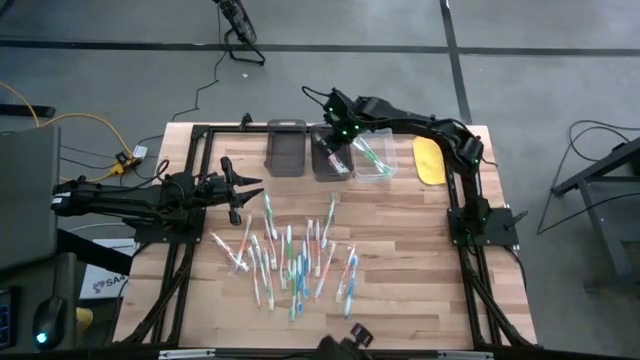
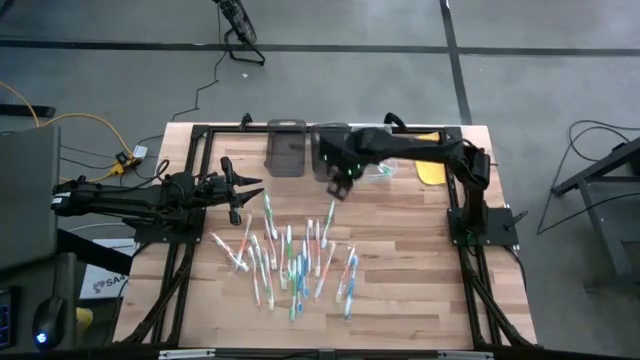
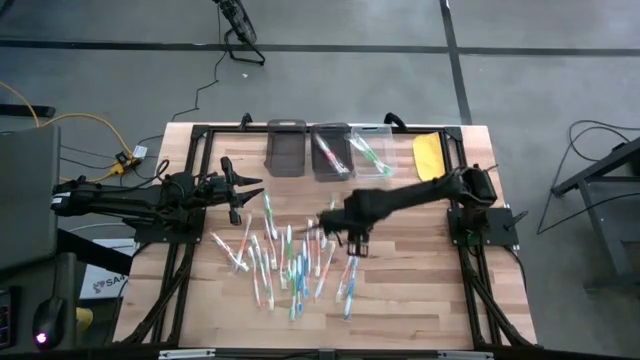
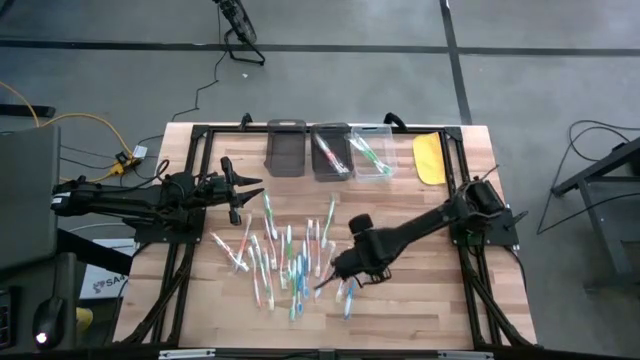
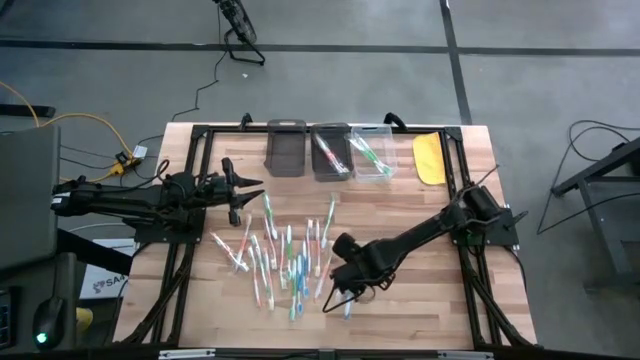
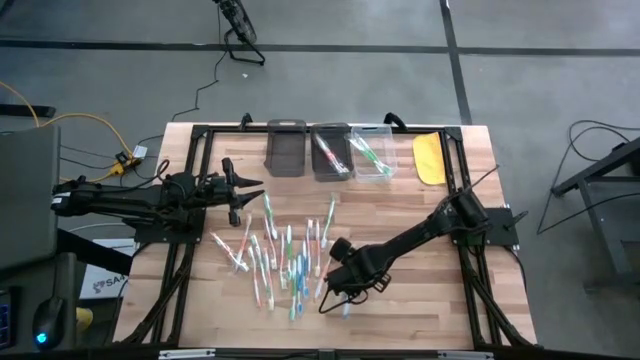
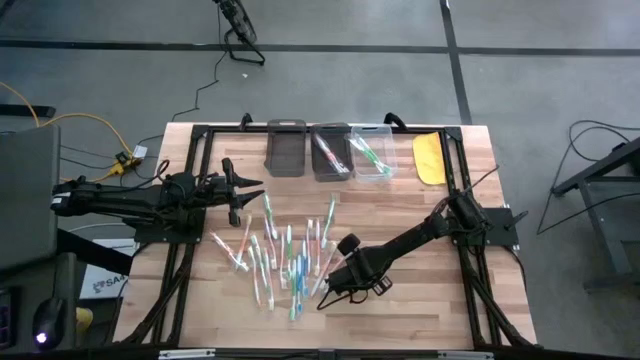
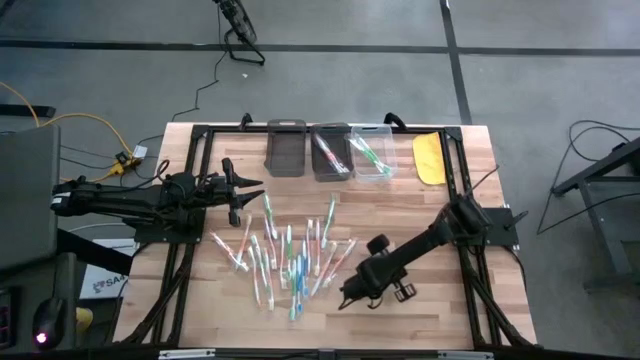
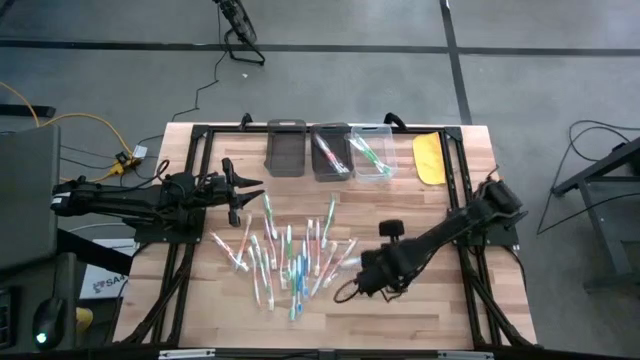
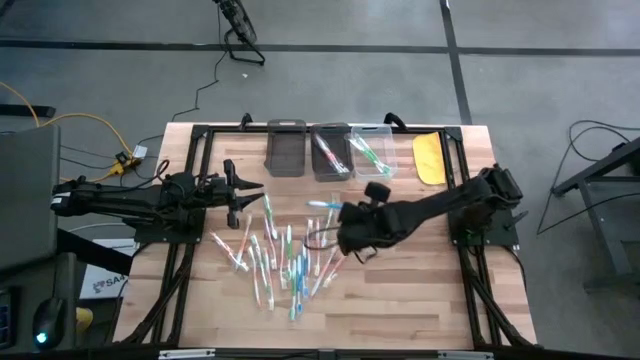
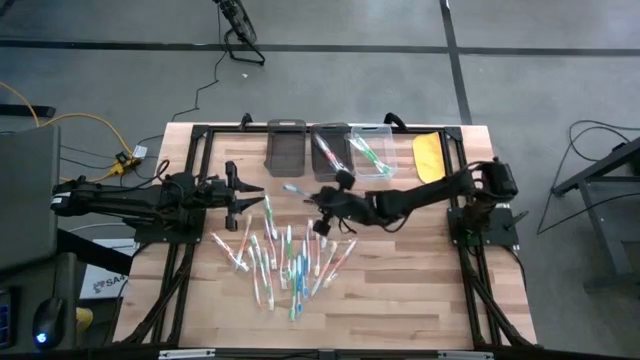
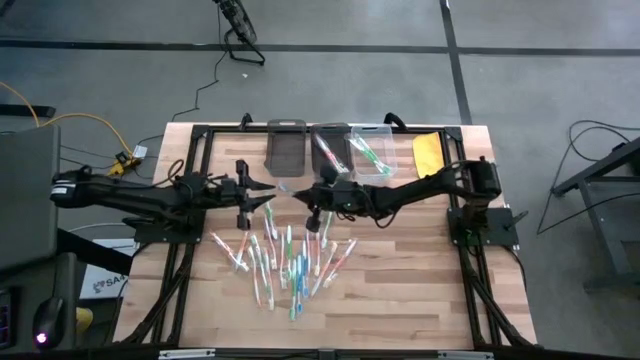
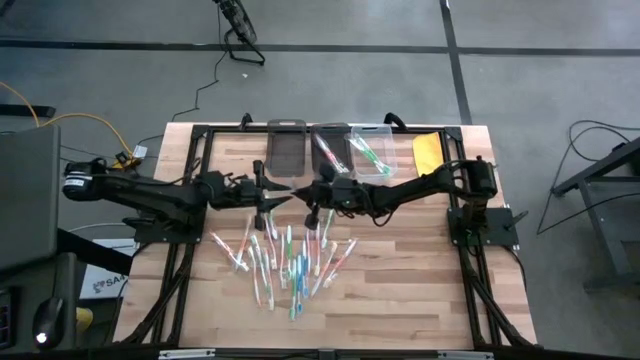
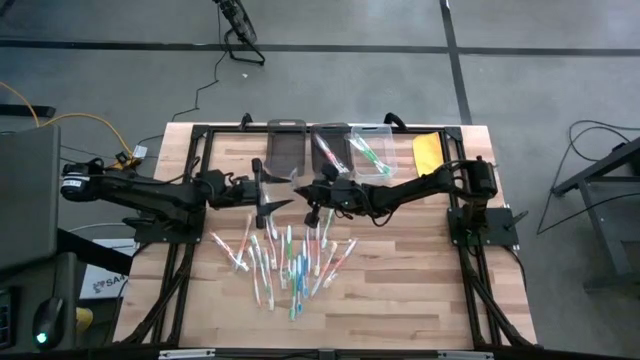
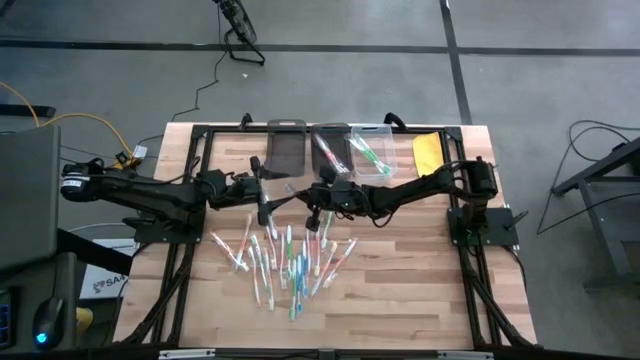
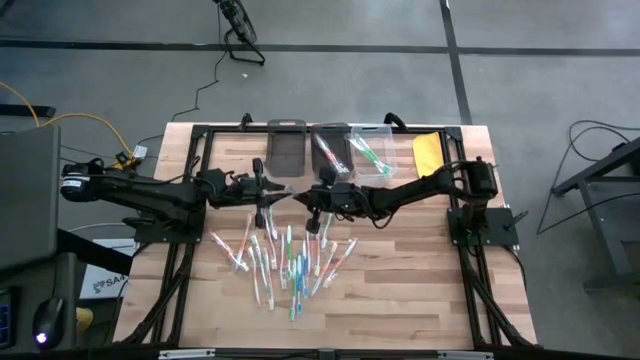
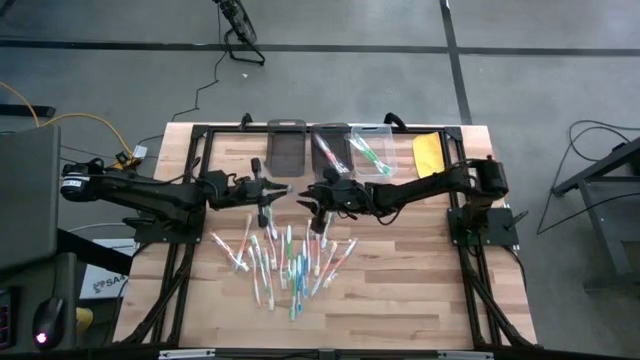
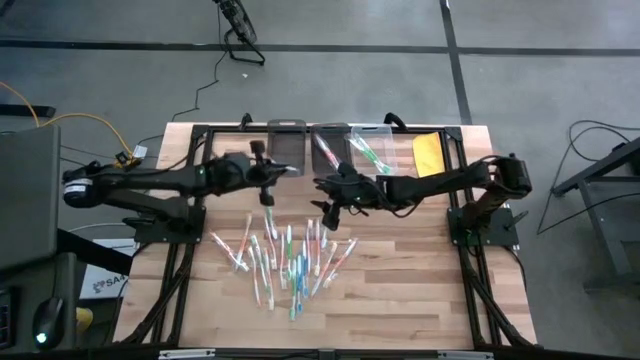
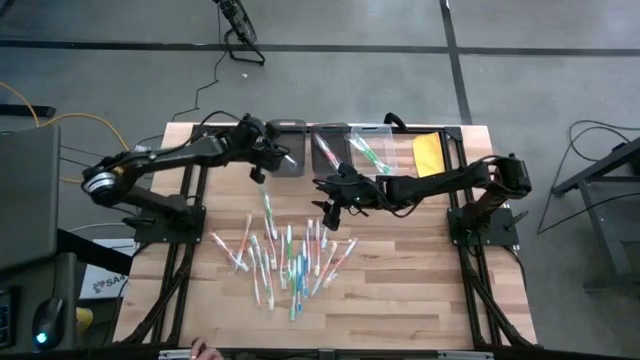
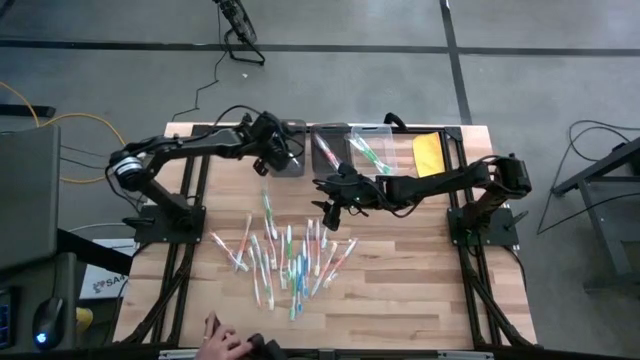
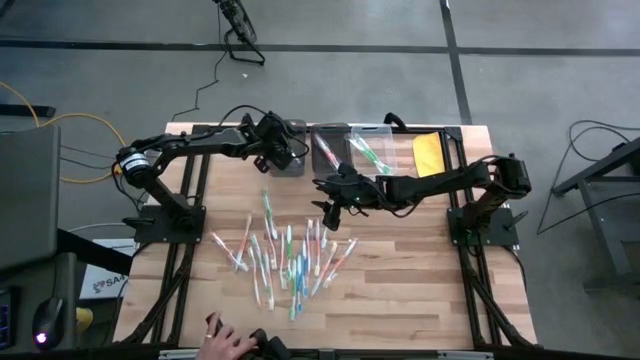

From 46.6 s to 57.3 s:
Task: Pick & Place Toothbrushes
Put the blue toothbrush into the left black bin

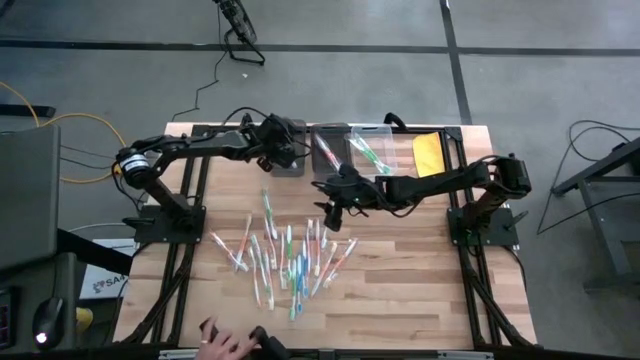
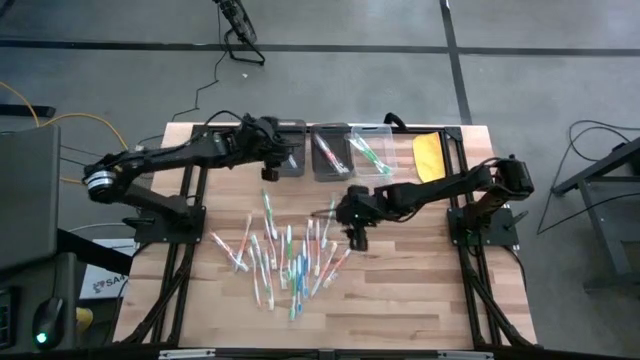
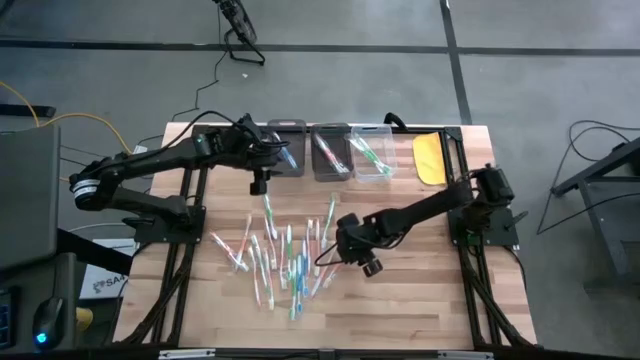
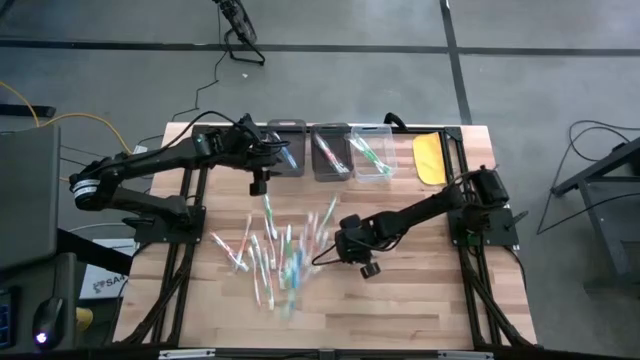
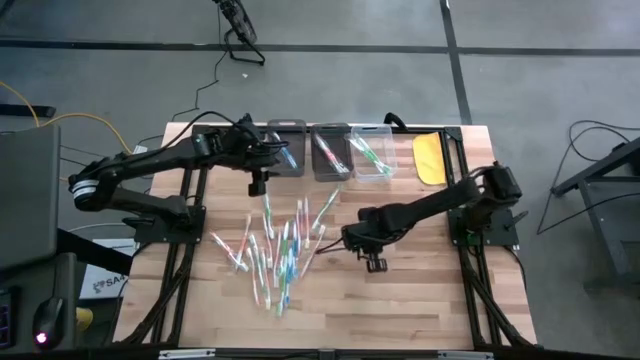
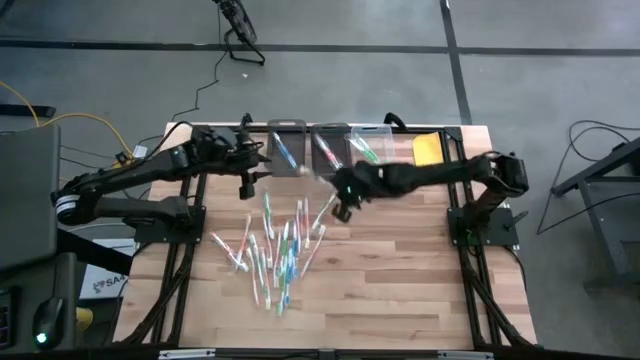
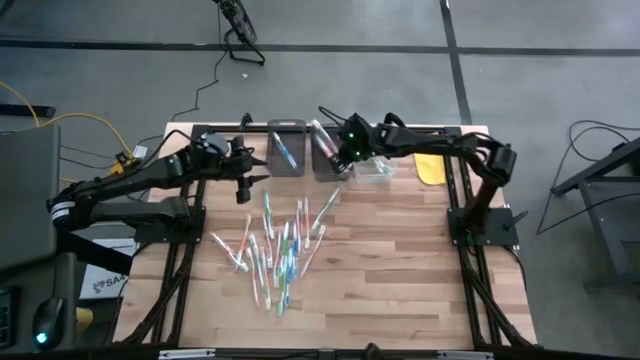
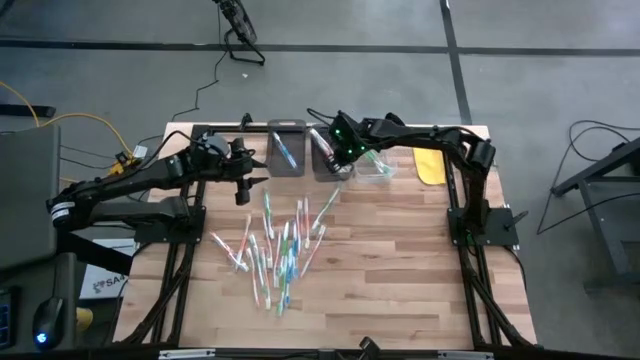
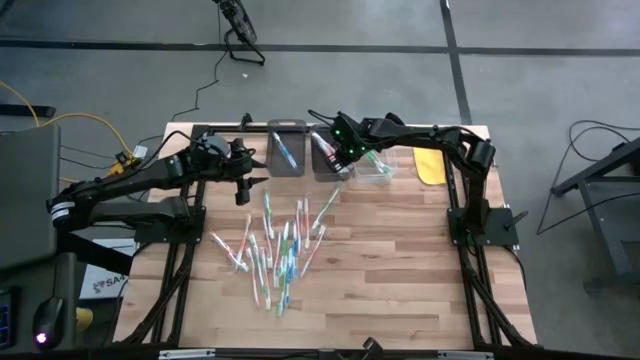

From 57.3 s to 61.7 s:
Put the orange toothbrush into the right black bin

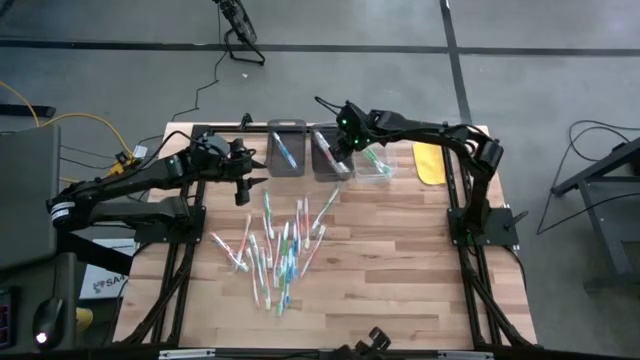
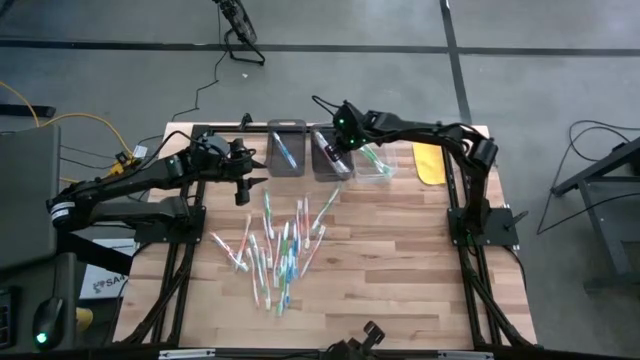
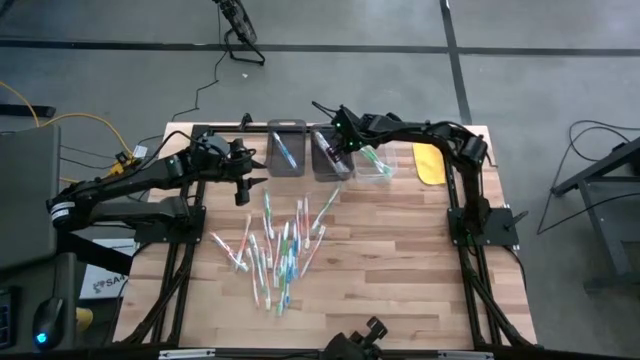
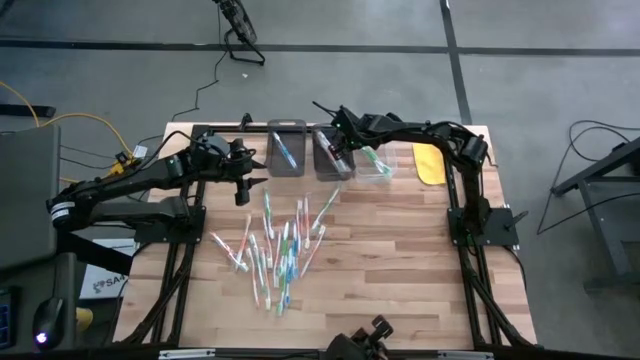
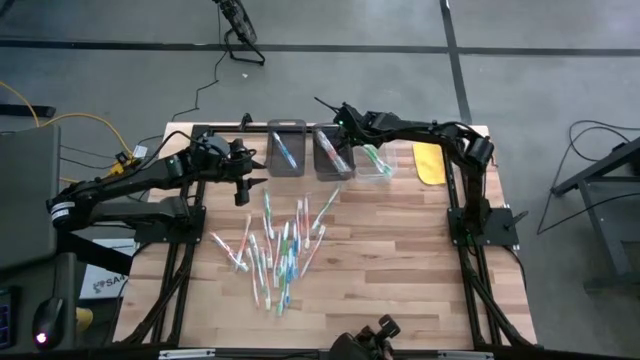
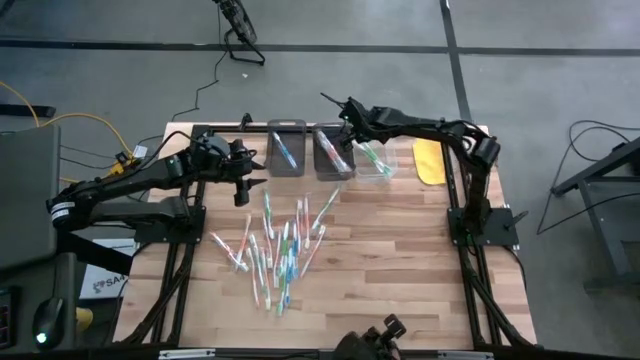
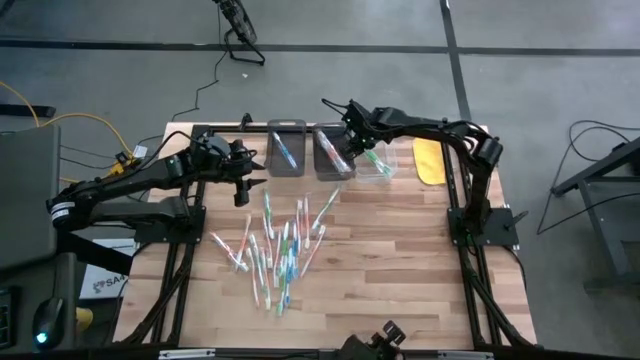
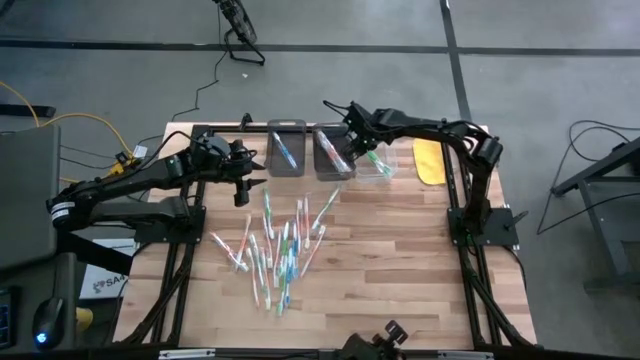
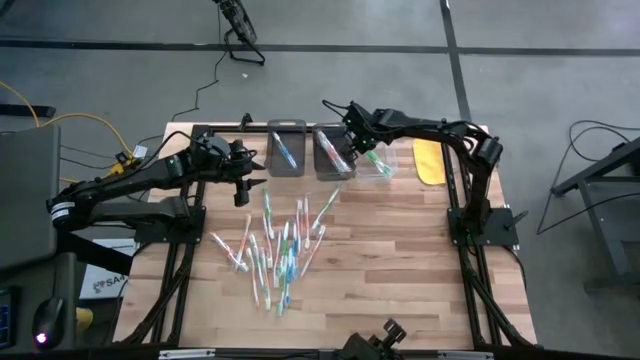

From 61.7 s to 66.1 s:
Adjust the green toothbrush in the bin

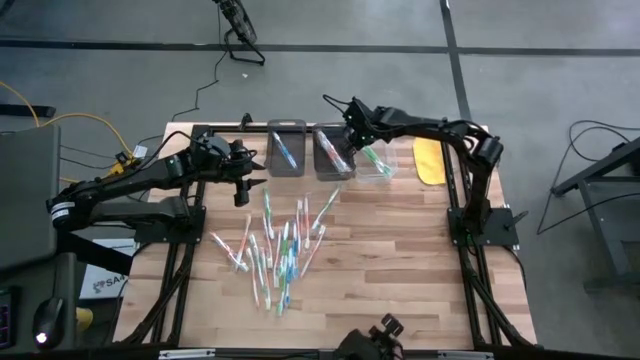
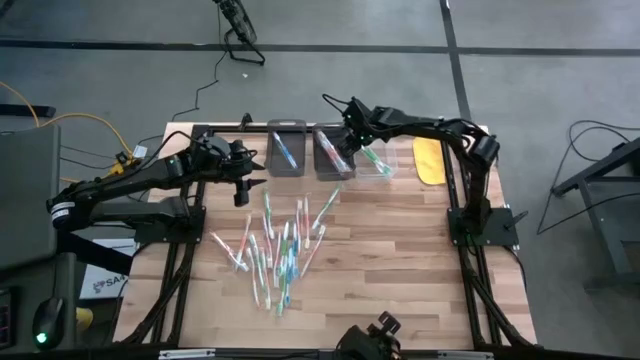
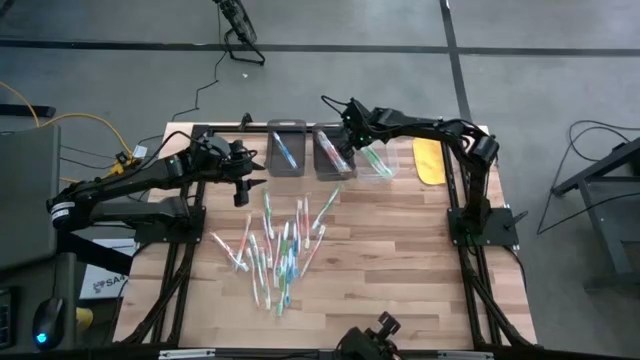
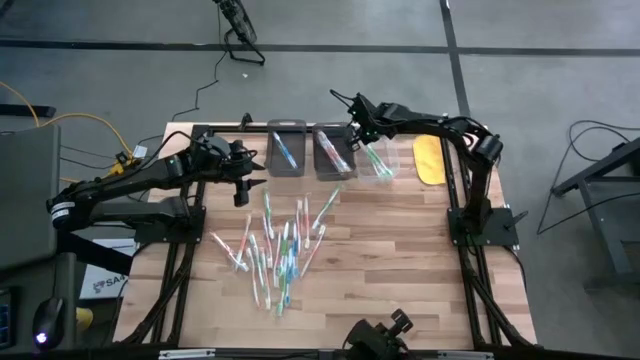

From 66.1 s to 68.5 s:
Adjust the green toothbrush in the bin
